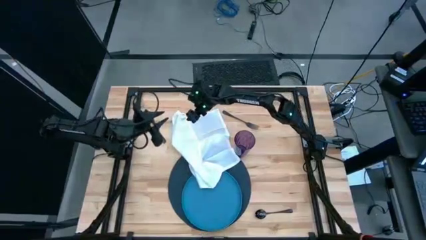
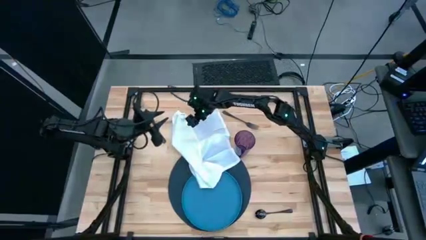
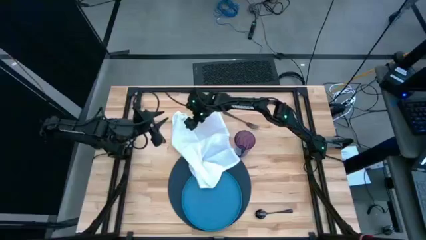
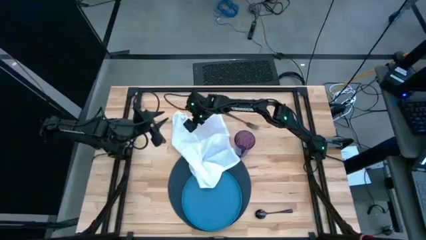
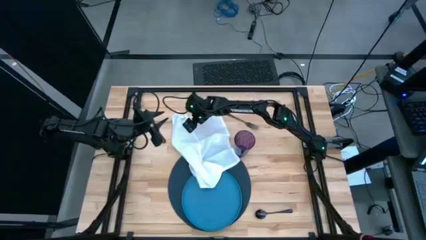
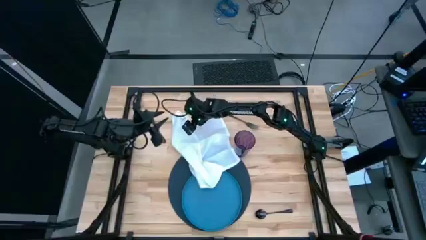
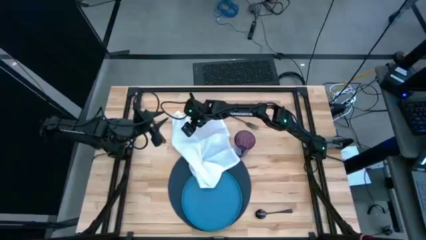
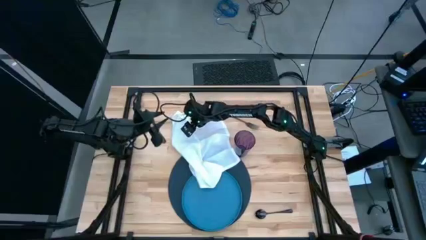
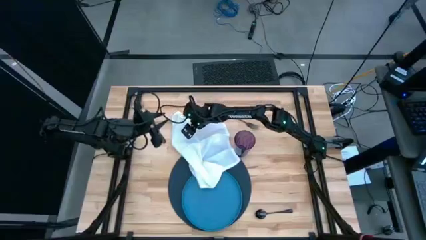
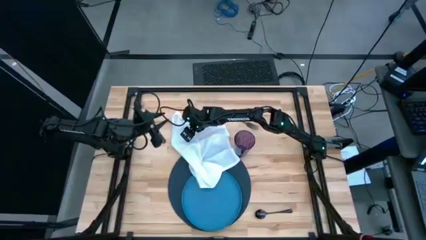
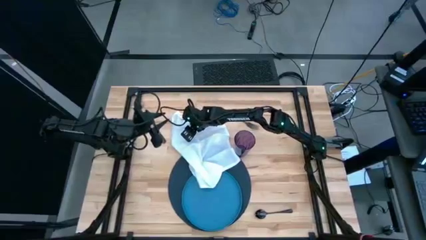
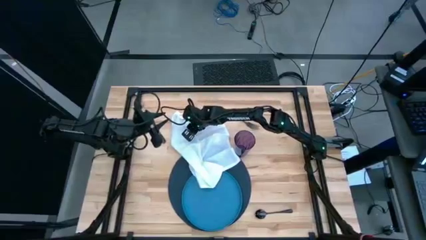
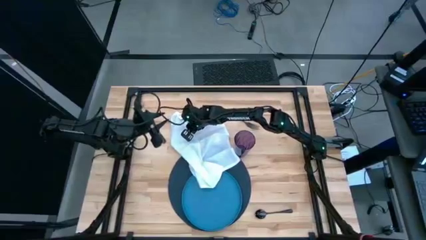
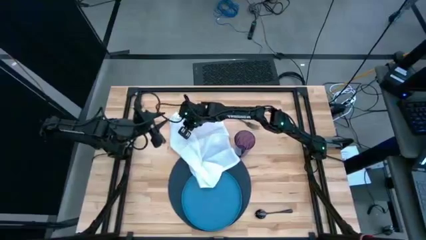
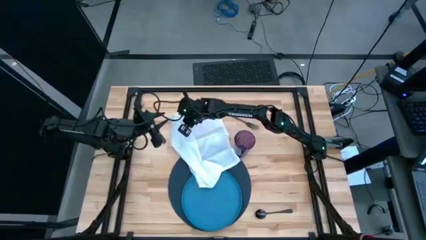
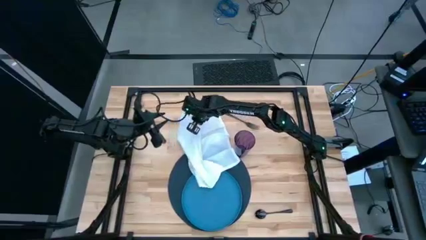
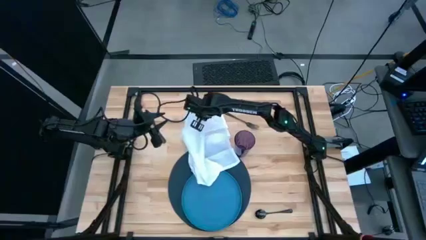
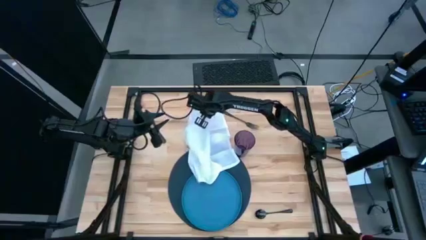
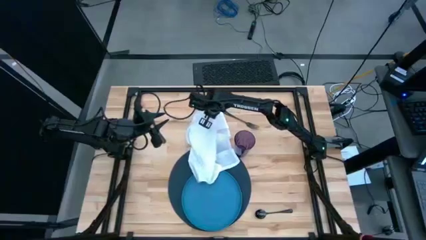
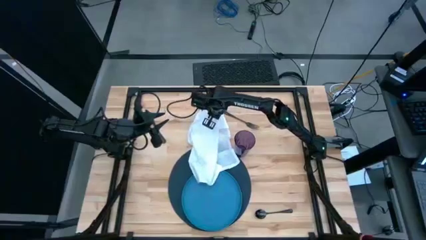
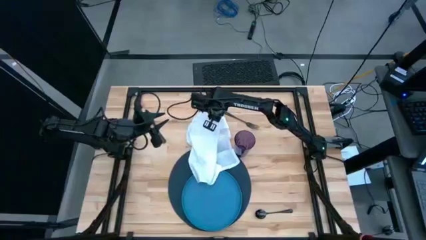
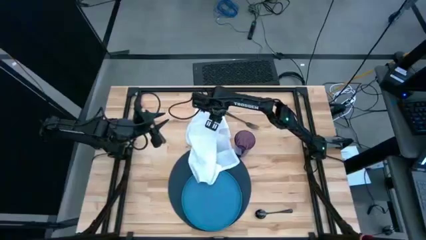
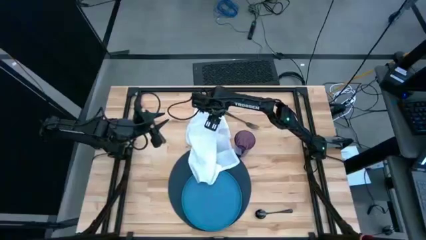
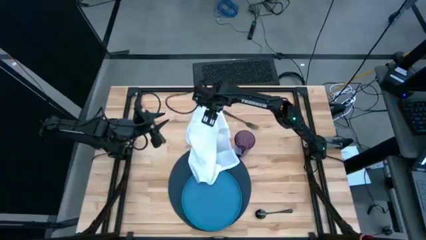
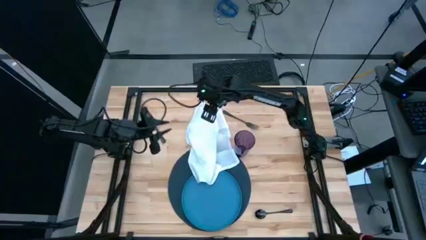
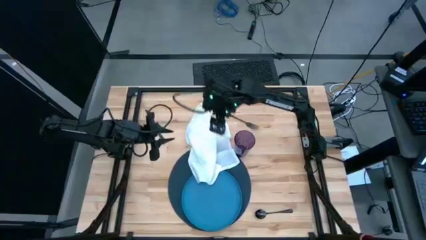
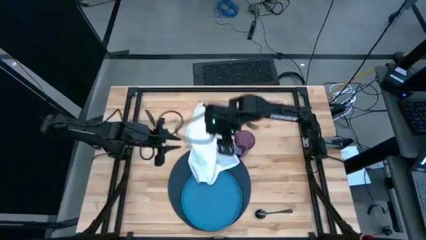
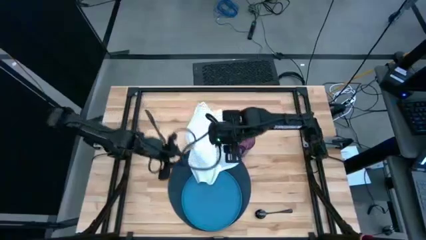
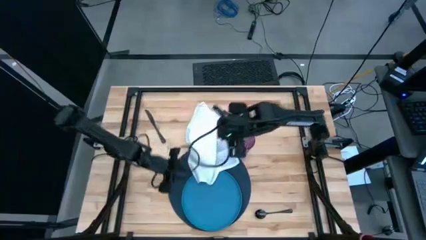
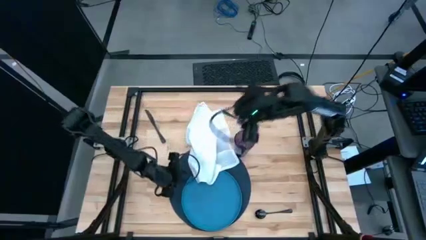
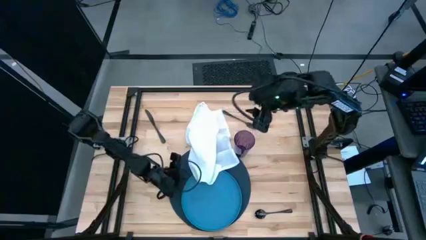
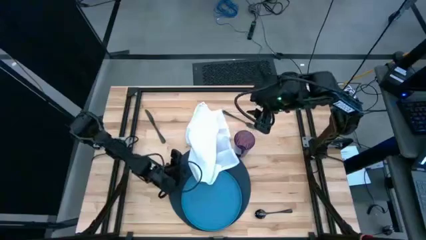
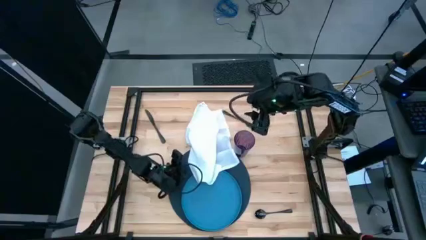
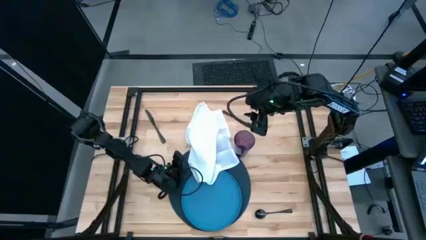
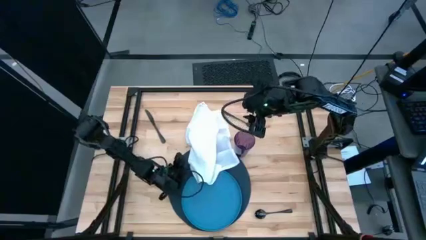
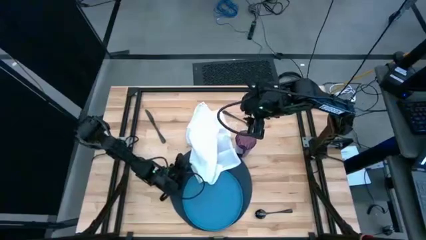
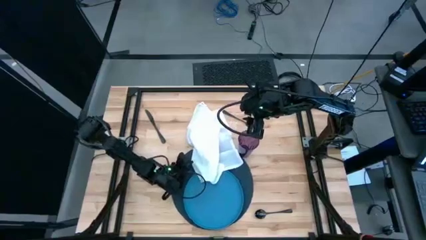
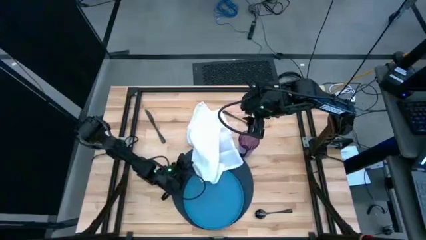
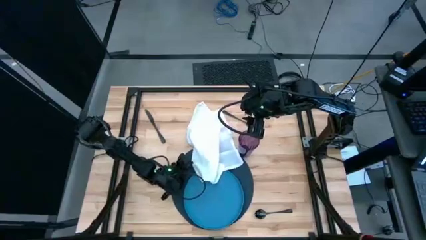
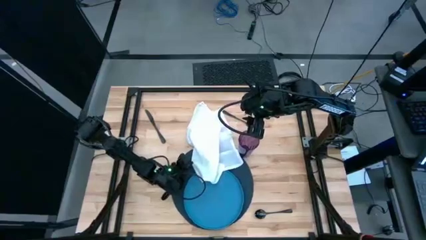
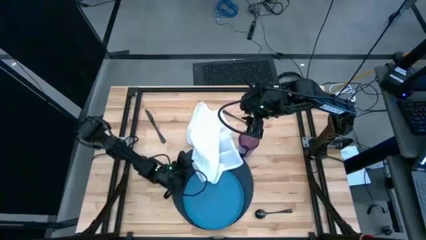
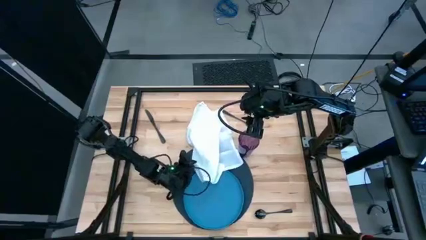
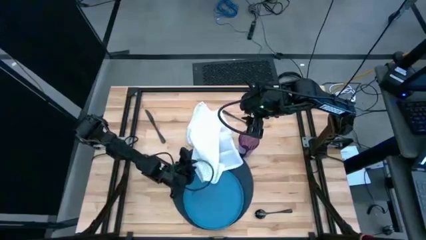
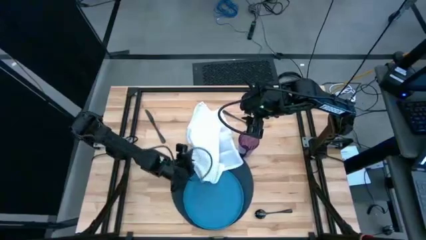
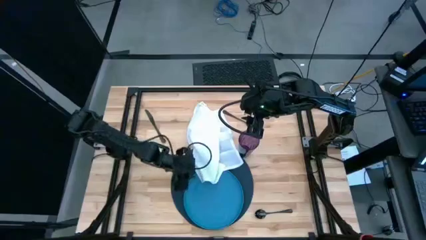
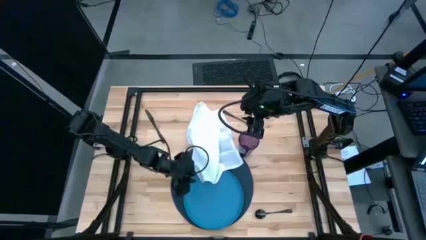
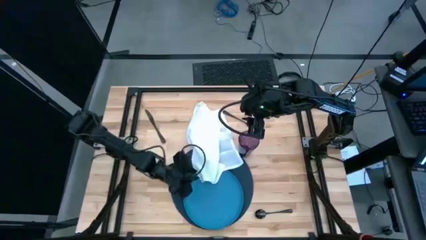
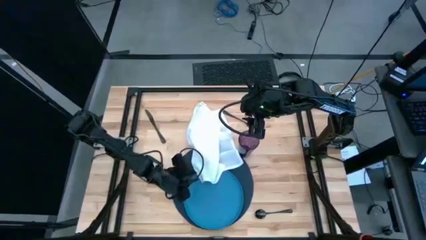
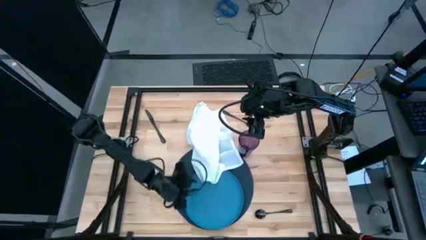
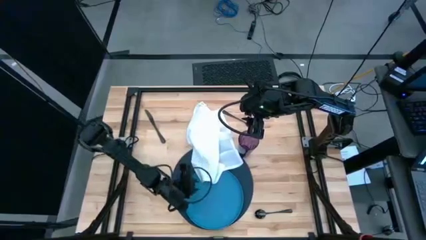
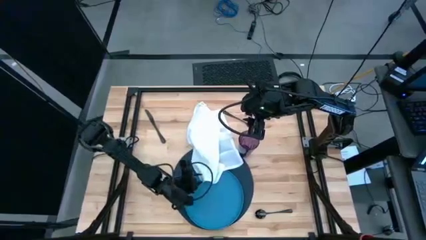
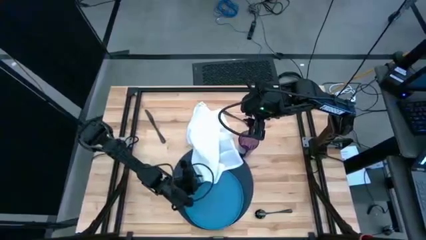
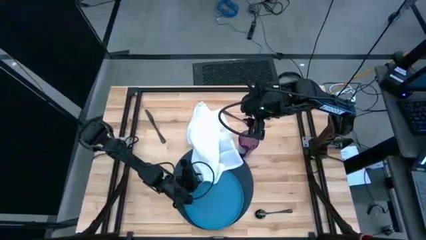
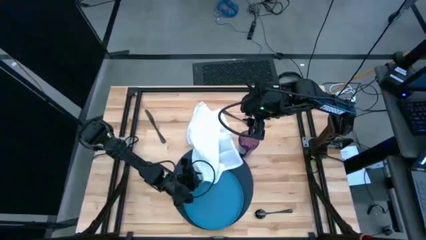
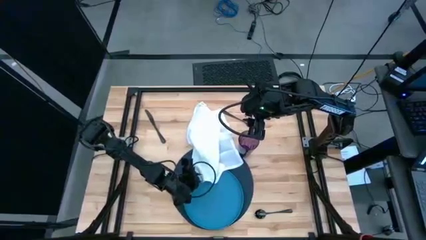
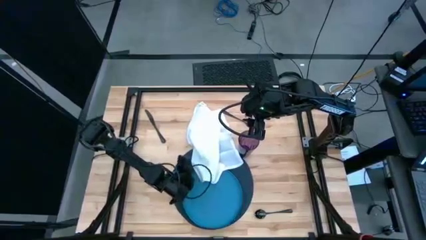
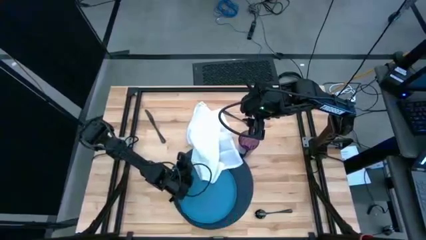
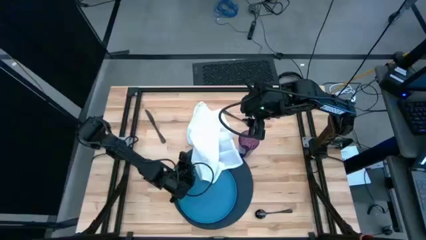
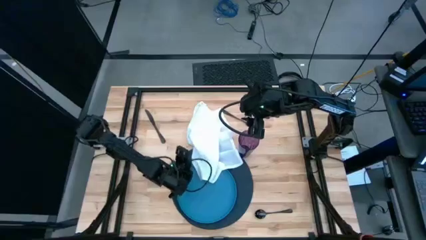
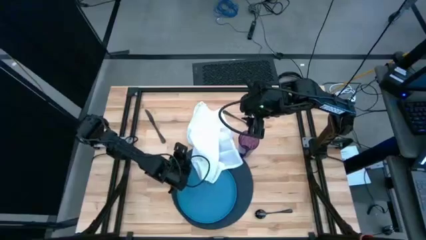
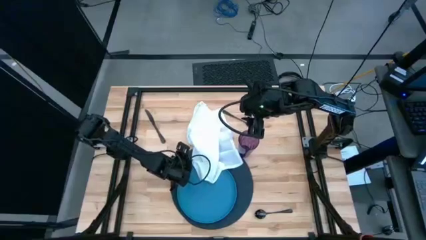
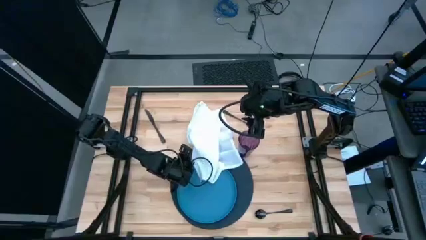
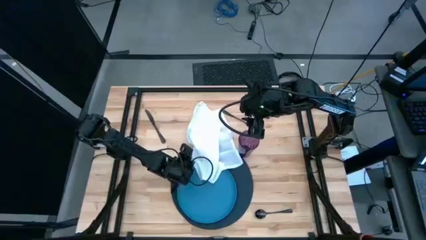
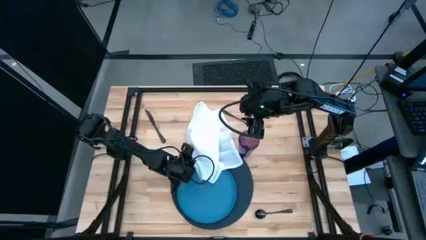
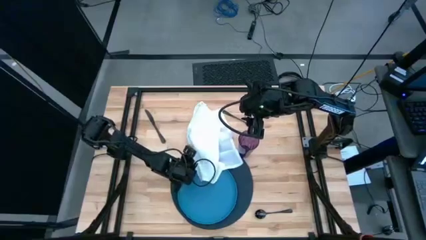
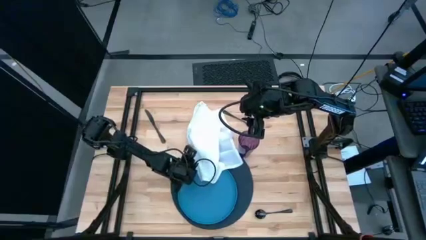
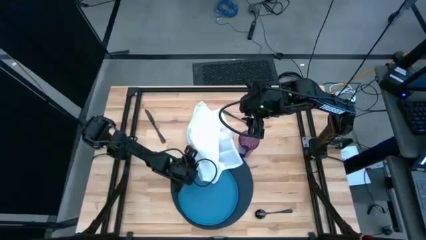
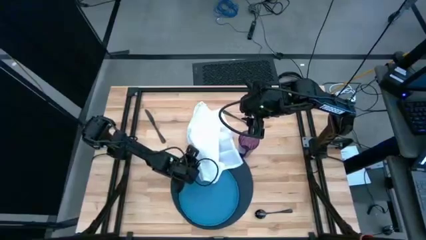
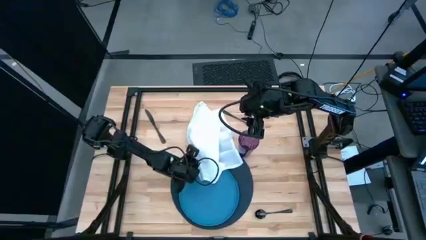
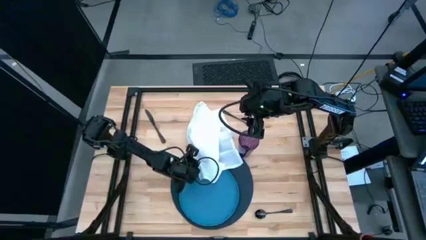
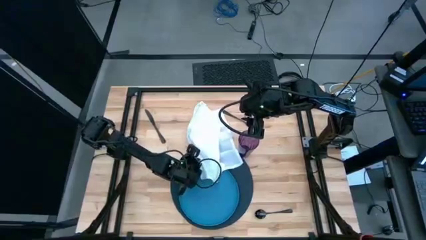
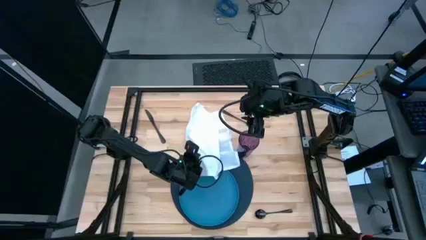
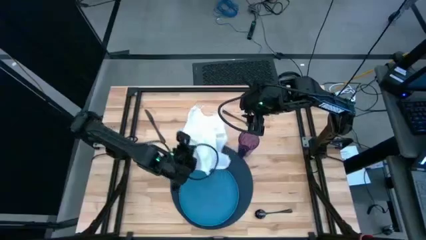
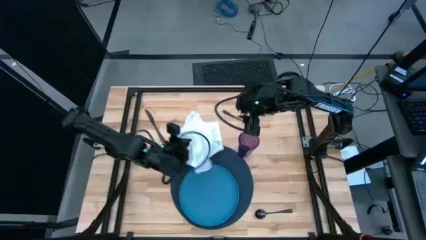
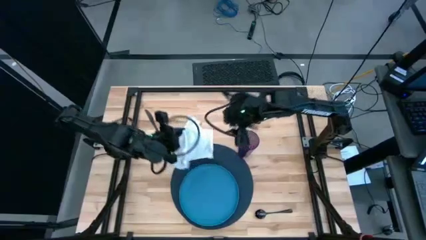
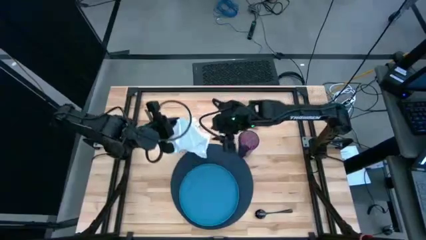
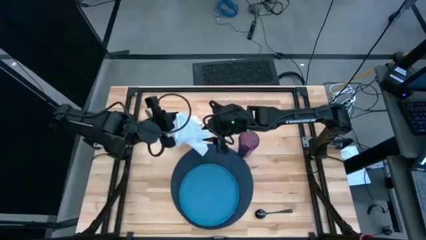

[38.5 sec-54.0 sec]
Task: Set table place
Fold the white napkin
